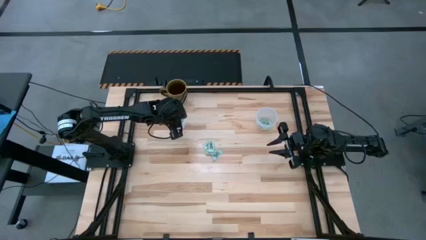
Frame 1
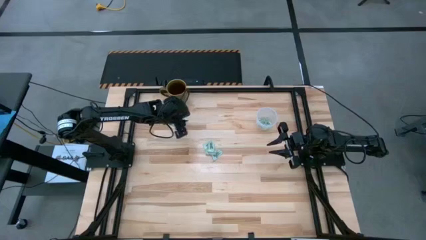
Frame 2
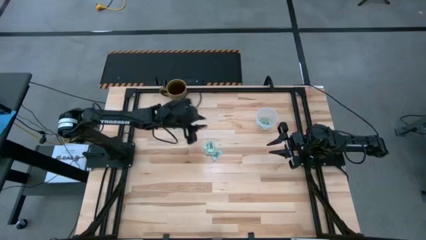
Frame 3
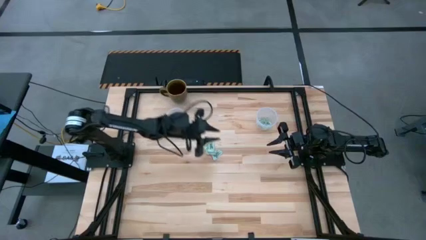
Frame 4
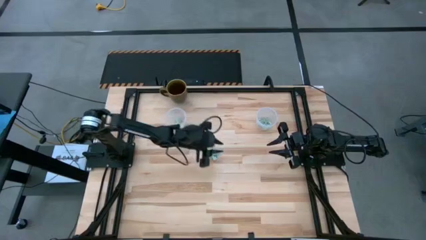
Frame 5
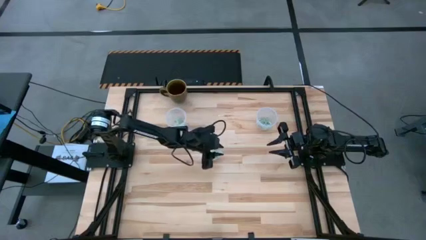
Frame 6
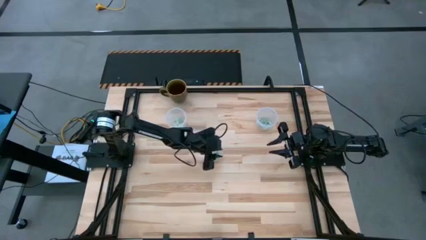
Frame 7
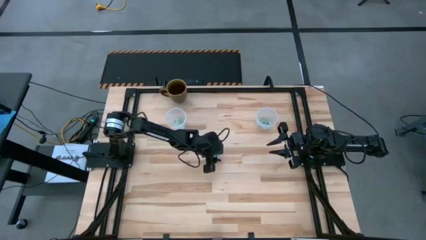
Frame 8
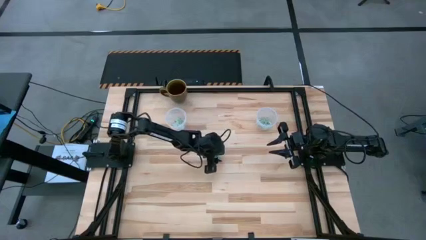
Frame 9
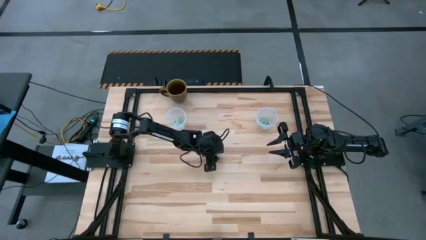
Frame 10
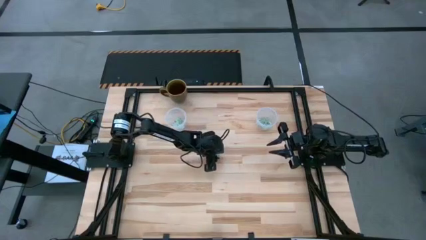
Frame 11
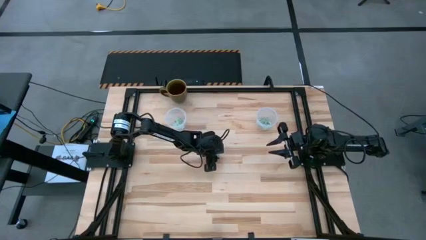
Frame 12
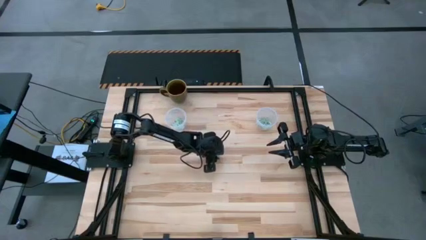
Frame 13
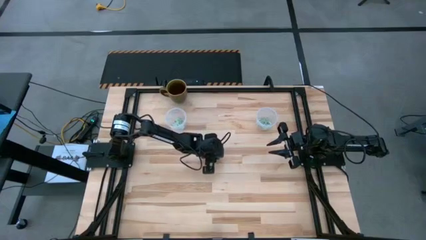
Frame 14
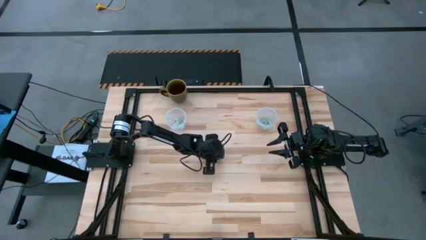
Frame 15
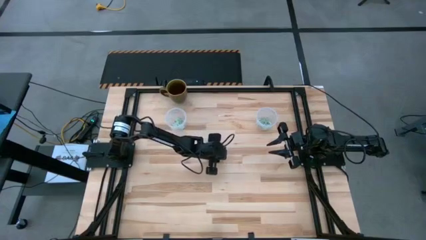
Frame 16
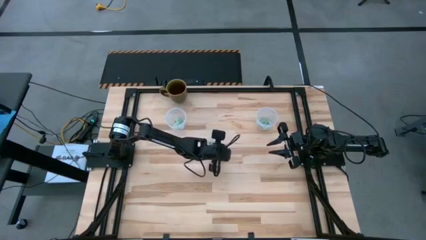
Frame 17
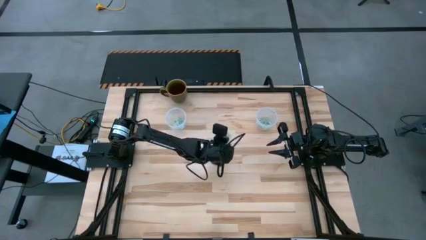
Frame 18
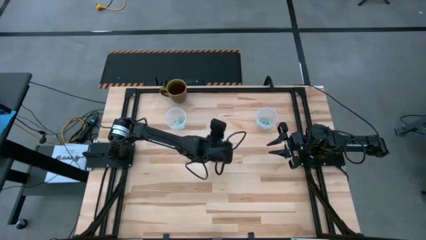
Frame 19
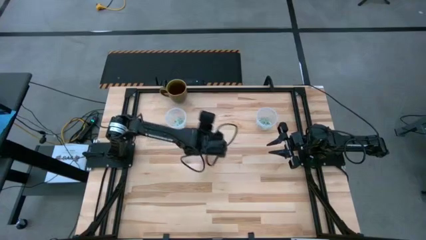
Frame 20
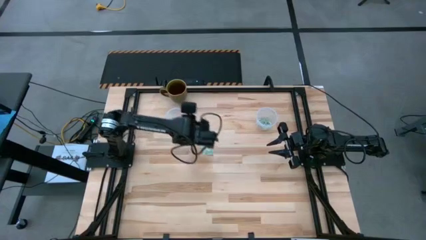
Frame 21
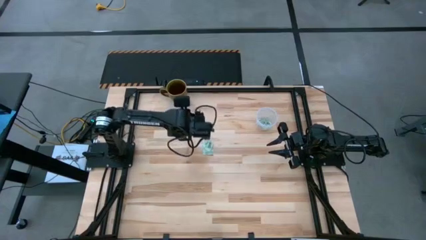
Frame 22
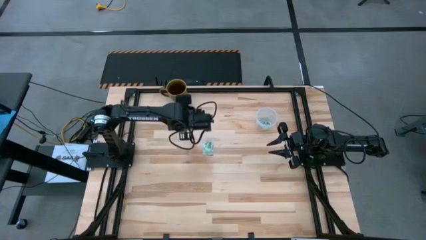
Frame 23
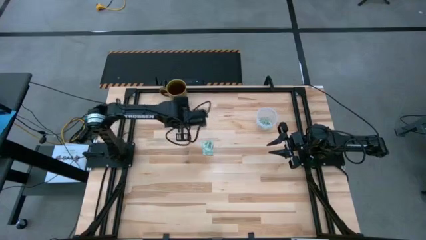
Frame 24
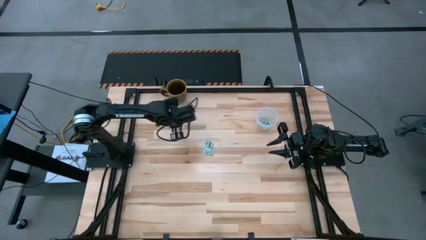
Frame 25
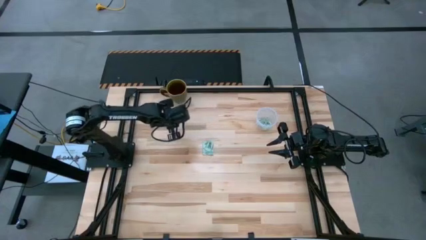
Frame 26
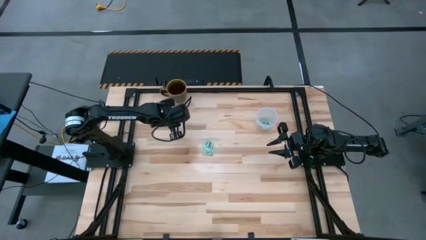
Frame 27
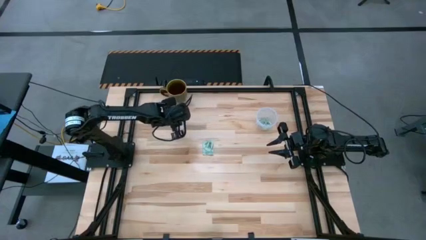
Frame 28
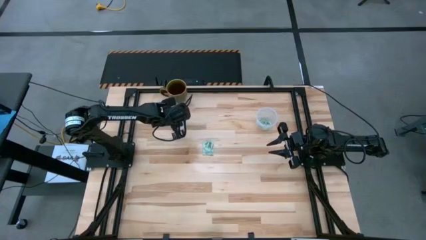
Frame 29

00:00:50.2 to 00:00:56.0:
Task: Pick and place items into bin
Put the stevia packet into the left transparent bin

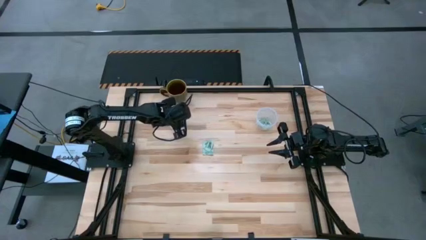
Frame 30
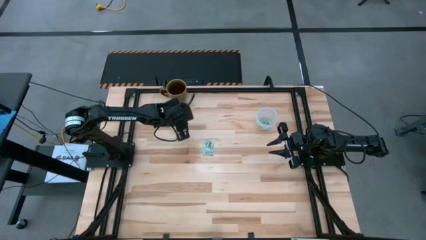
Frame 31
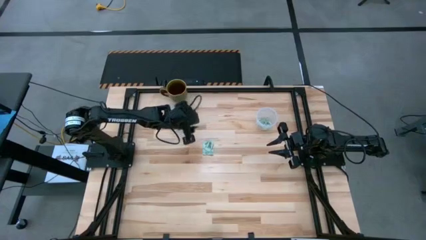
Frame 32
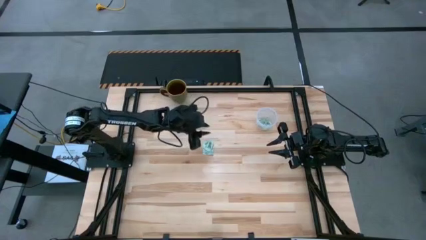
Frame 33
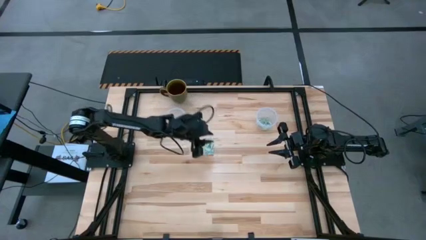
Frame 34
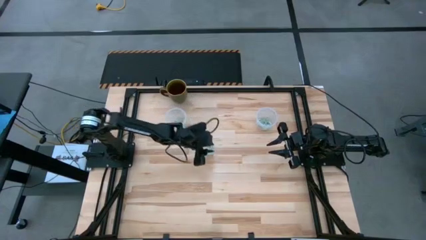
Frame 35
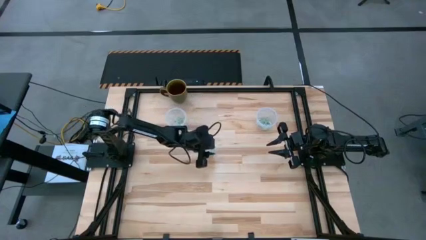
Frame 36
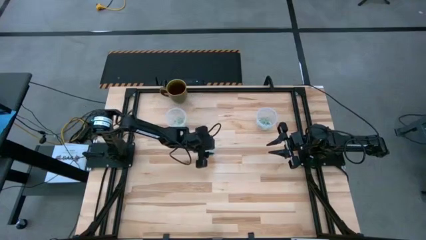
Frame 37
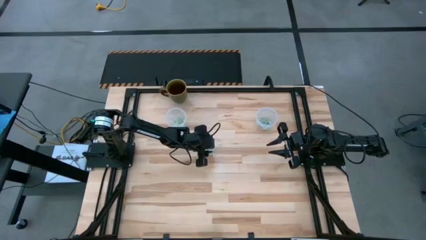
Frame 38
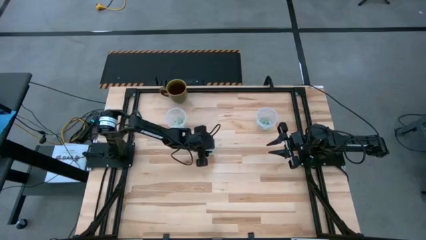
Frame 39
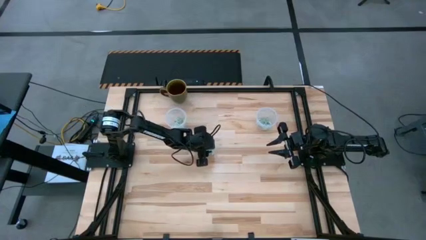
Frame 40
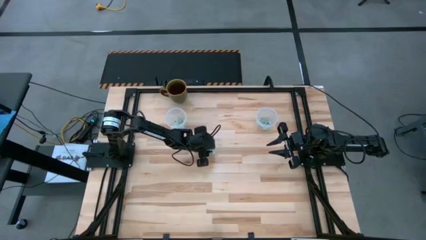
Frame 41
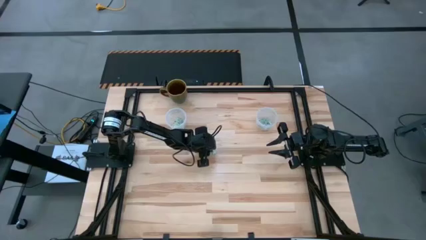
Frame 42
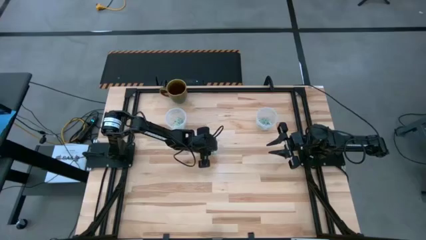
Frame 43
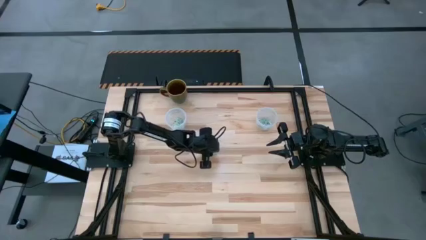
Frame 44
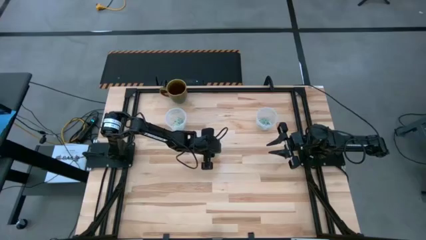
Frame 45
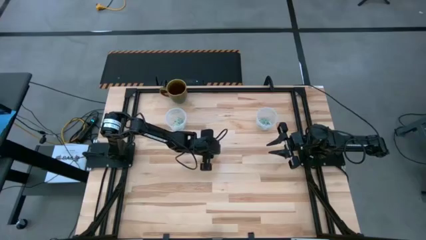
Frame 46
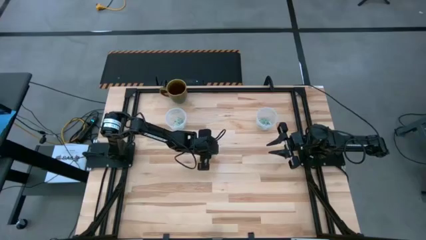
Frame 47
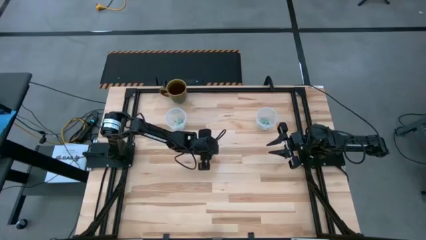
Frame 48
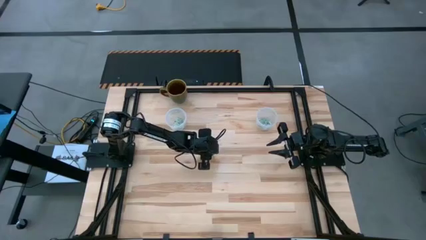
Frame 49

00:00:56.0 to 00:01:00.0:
Put the stevia packet into the left transparent bin

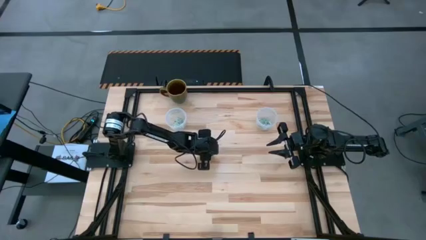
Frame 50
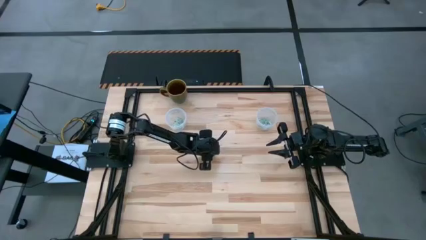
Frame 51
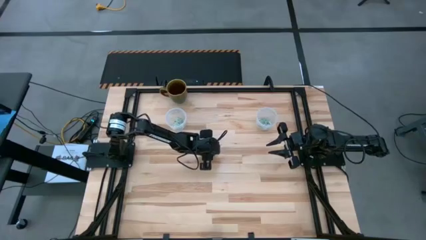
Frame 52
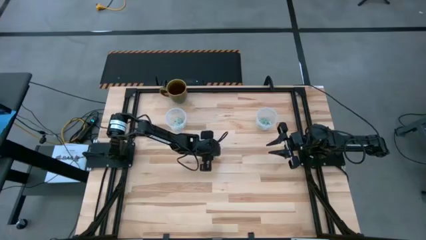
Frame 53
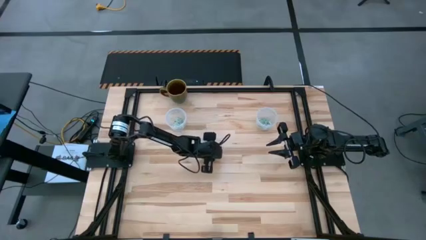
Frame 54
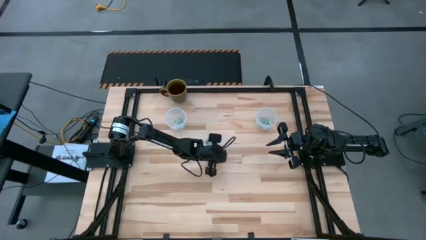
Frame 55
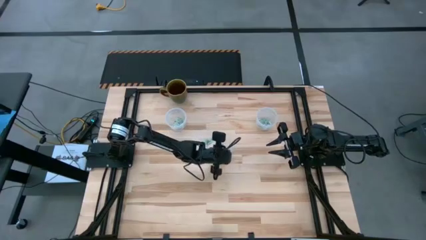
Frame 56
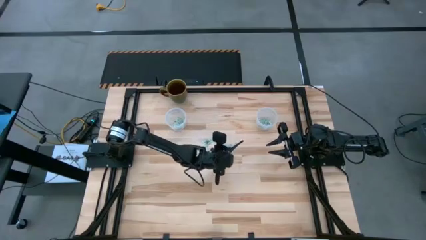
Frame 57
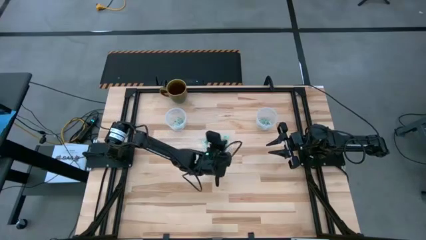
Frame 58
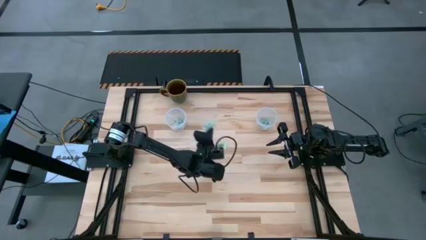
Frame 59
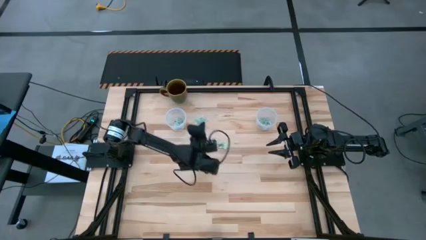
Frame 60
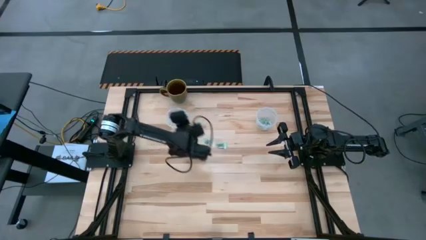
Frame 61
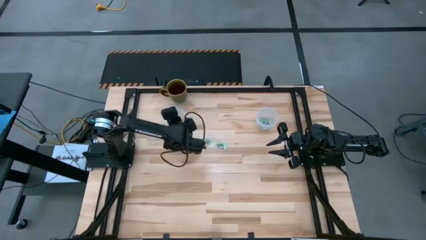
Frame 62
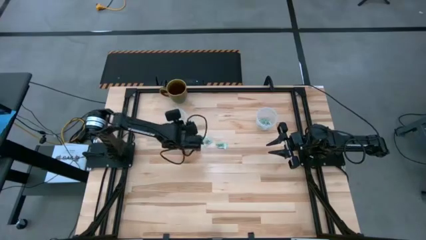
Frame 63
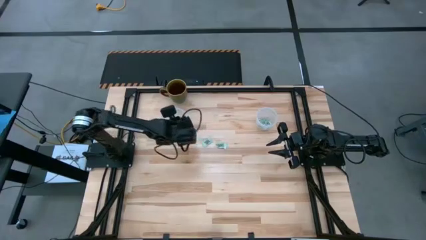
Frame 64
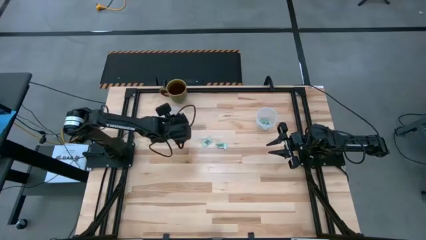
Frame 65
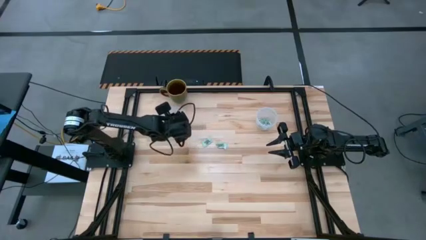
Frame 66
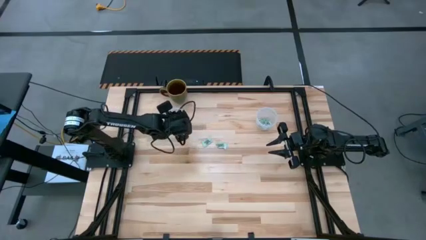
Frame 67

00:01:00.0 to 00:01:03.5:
Put the stevia packet into the left transparent bin

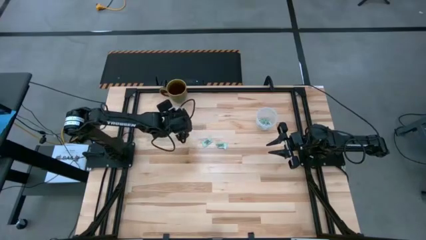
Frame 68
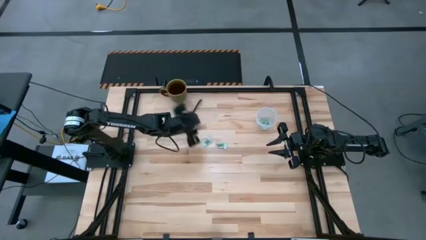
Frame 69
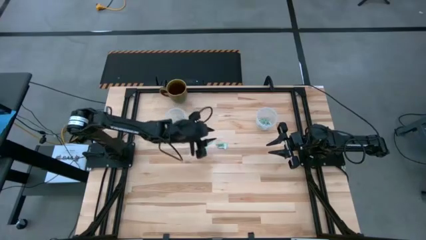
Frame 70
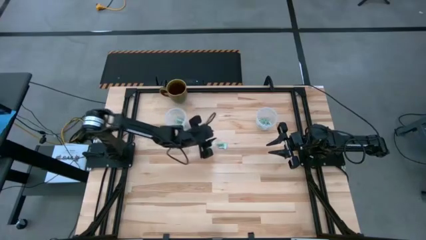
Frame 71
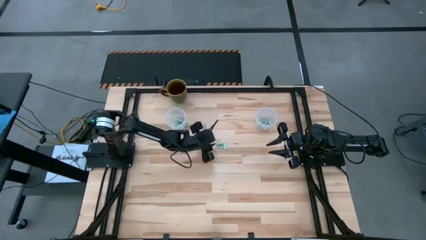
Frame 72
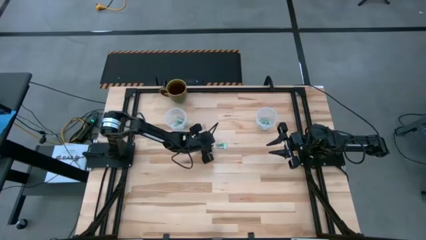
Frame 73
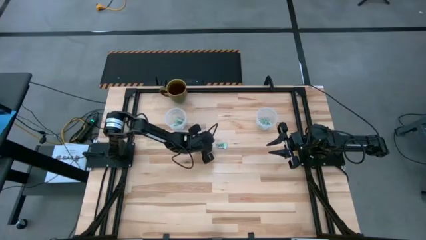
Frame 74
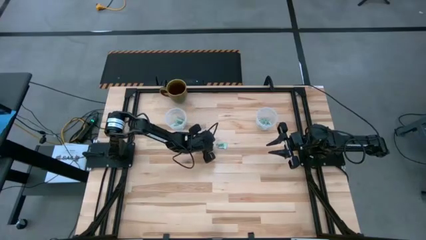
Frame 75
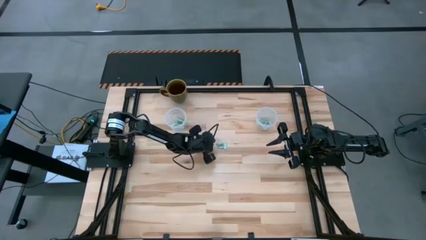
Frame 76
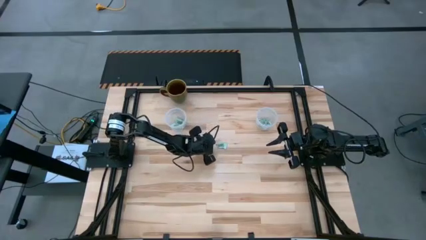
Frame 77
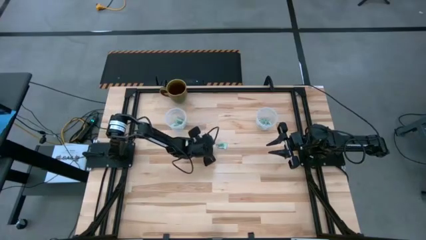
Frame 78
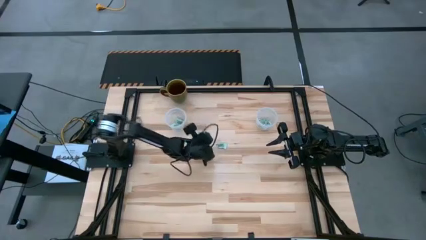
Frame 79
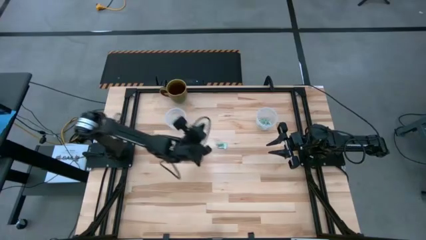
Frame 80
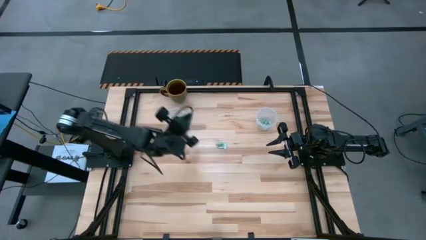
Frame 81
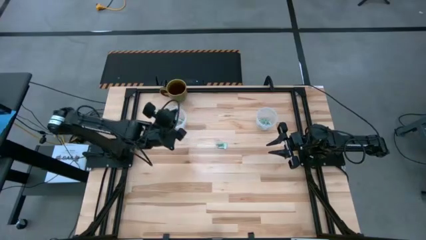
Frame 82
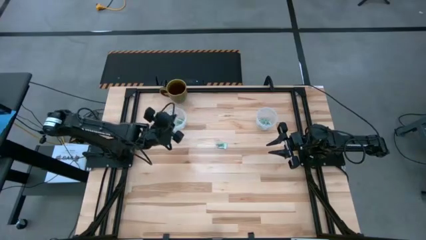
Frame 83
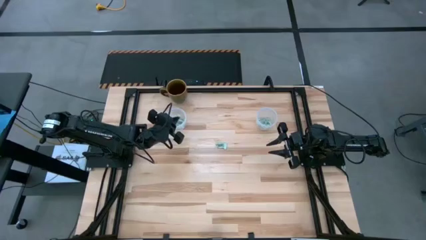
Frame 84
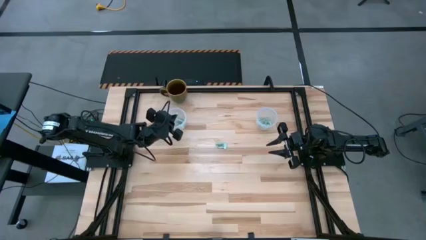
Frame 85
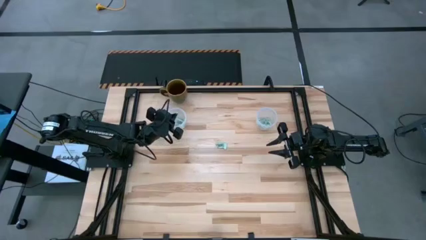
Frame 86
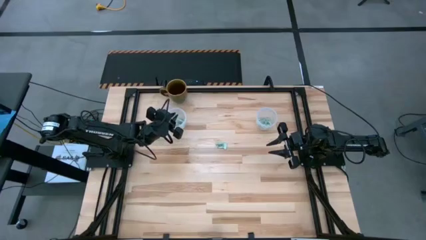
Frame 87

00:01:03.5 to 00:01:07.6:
Put the stevia packet into the left transparent bin
